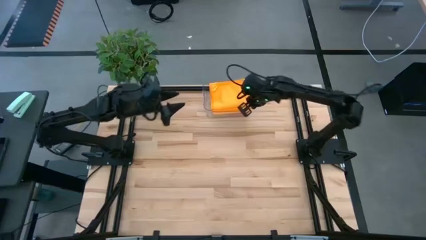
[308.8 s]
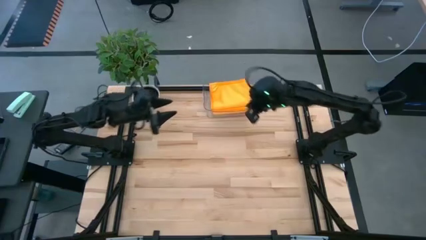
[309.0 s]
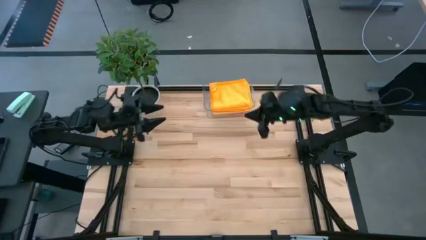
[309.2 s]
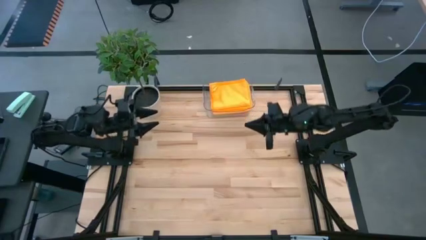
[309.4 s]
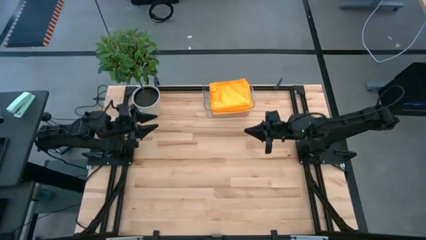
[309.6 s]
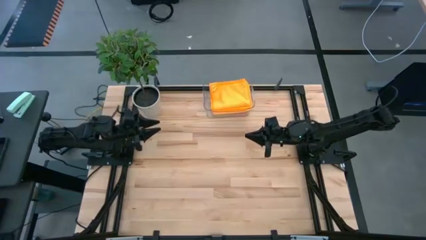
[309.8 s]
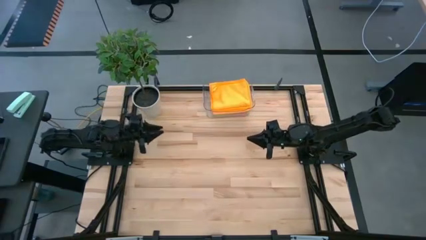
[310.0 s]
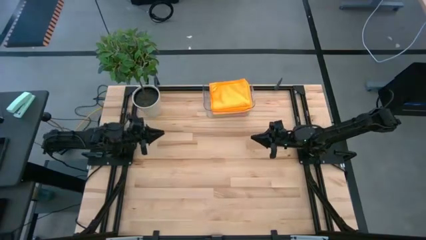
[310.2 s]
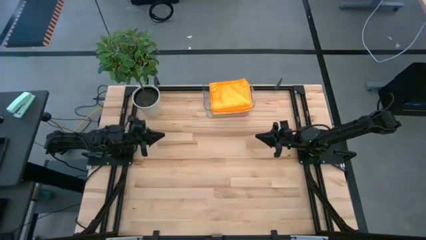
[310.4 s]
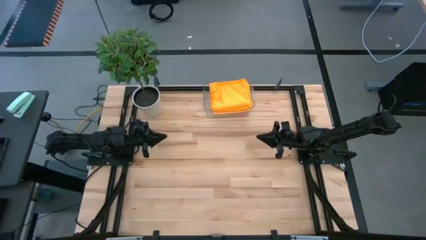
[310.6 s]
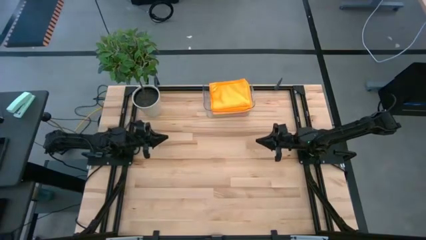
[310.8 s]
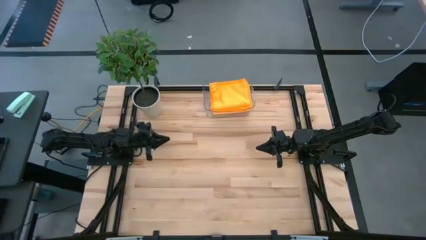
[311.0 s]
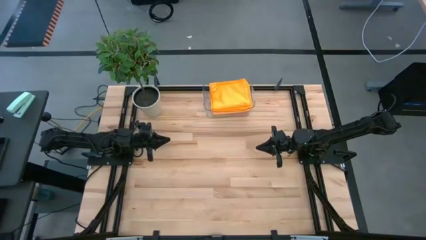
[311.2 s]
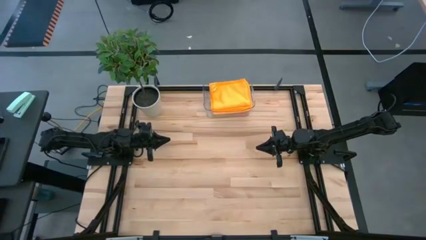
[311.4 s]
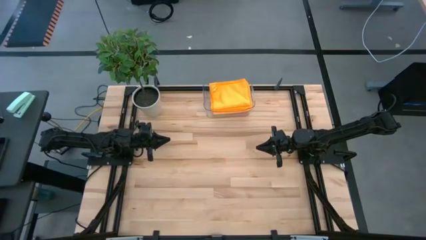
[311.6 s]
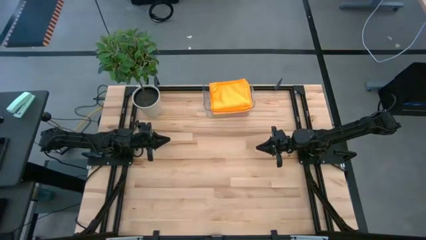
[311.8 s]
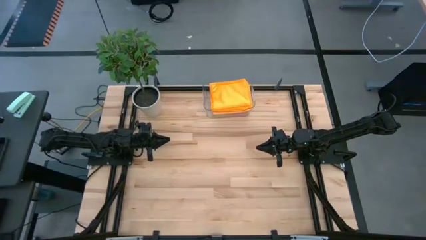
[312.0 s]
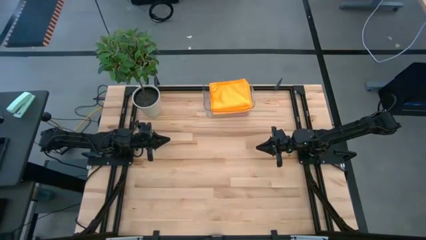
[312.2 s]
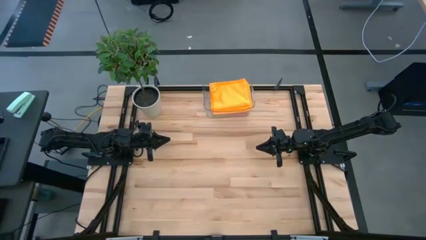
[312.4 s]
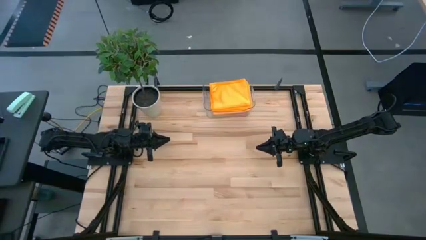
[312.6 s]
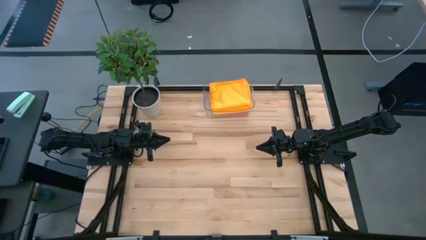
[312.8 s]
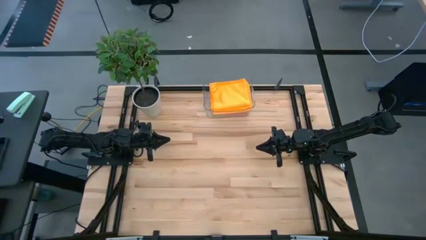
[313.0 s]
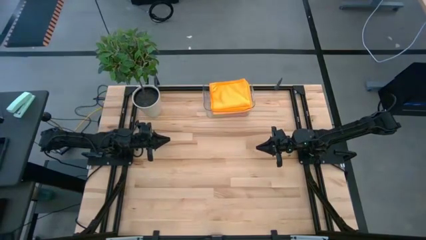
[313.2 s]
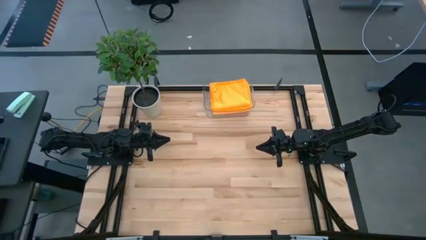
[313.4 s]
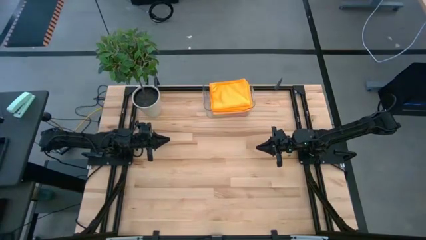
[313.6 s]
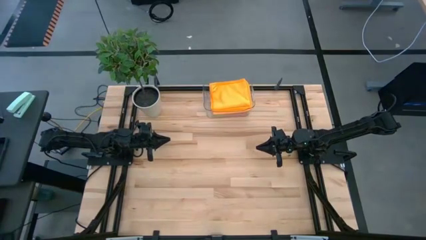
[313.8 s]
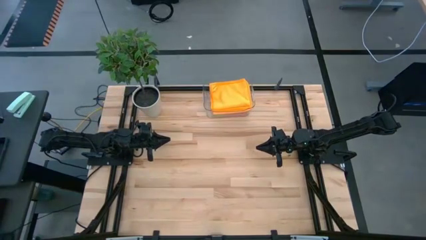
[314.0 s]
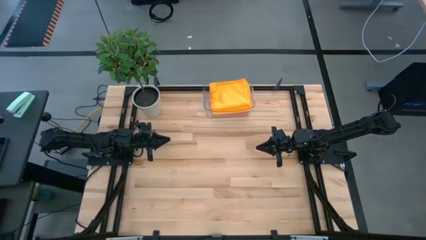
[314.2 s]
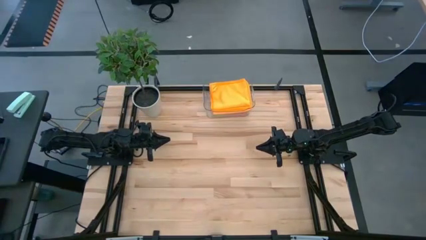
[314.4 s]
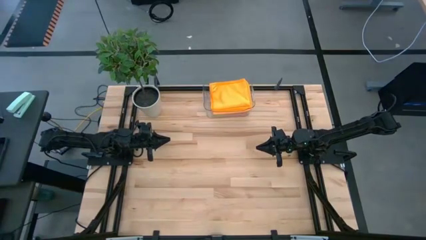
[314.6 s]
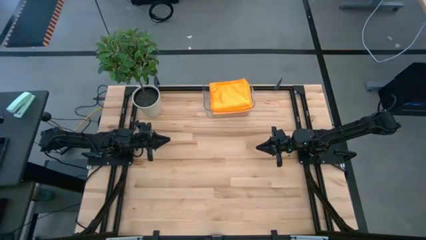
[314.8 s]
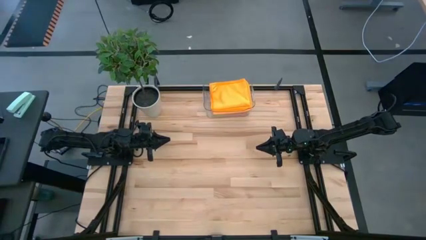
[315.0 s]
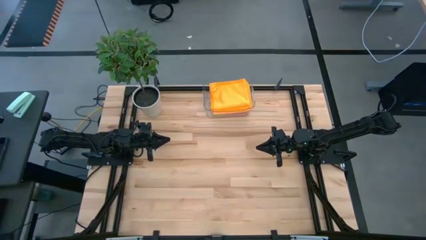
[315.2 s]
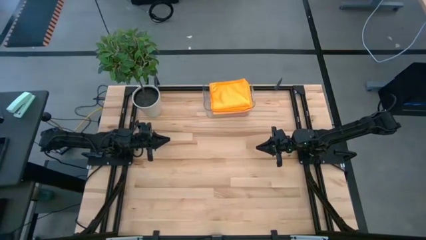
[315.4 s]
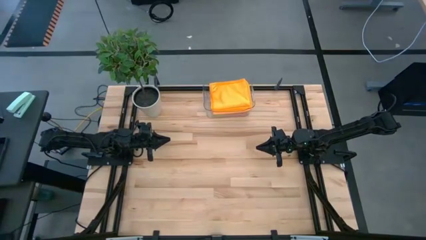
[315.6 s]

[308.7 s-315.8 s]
Task: Fold microfiber towels
Return to Home Position

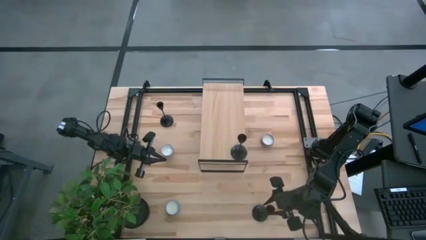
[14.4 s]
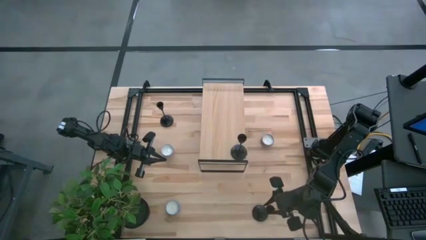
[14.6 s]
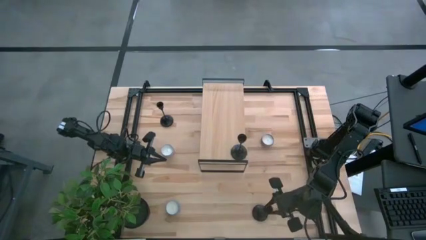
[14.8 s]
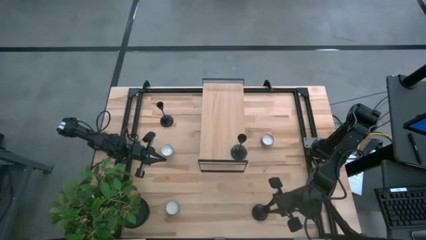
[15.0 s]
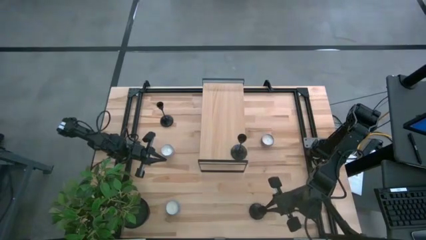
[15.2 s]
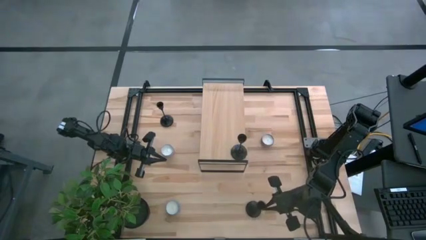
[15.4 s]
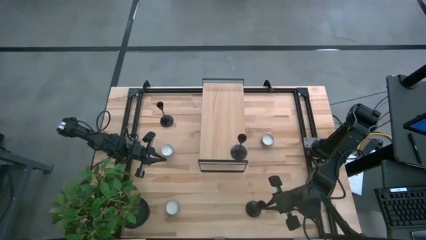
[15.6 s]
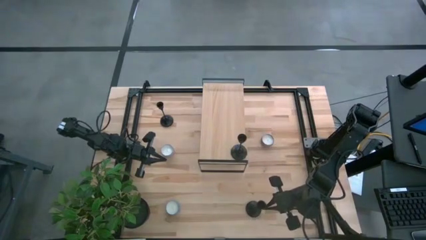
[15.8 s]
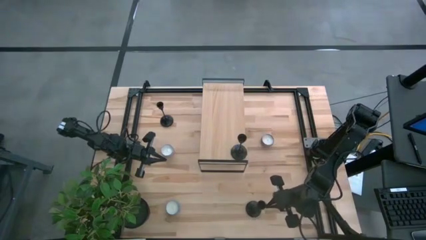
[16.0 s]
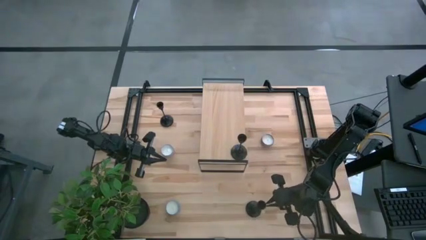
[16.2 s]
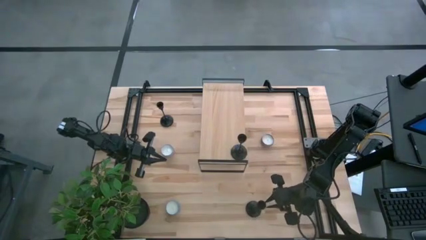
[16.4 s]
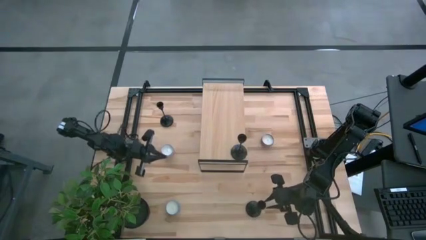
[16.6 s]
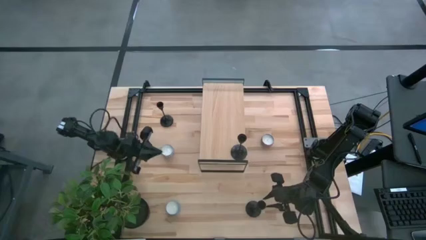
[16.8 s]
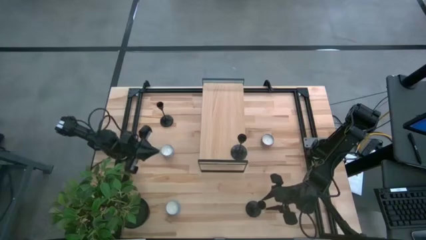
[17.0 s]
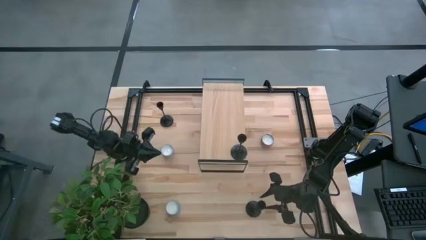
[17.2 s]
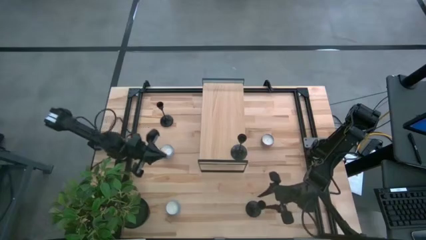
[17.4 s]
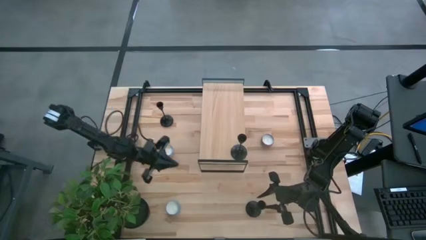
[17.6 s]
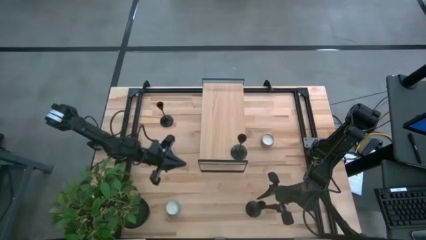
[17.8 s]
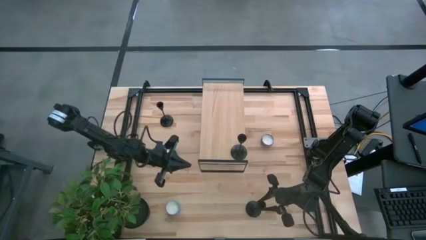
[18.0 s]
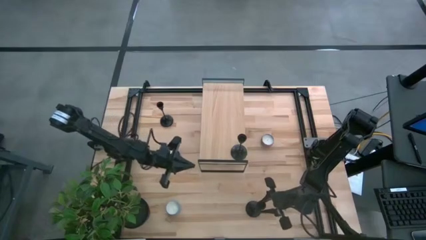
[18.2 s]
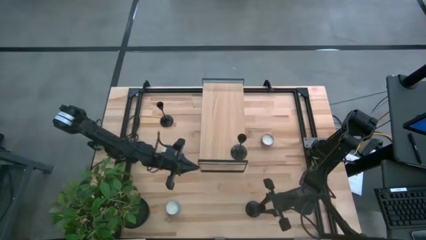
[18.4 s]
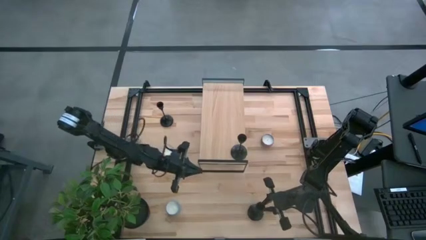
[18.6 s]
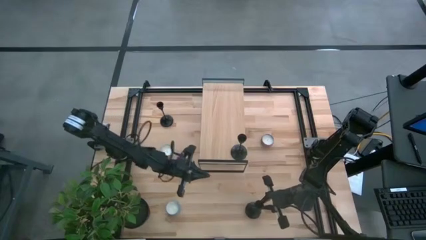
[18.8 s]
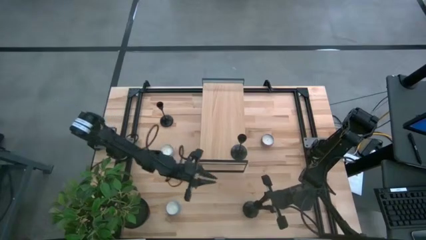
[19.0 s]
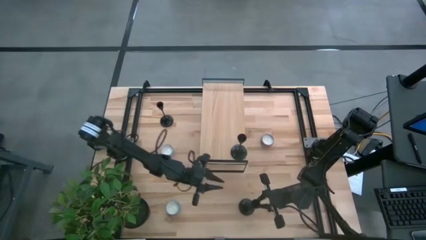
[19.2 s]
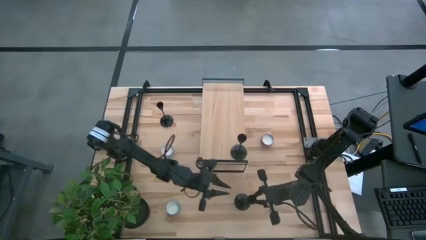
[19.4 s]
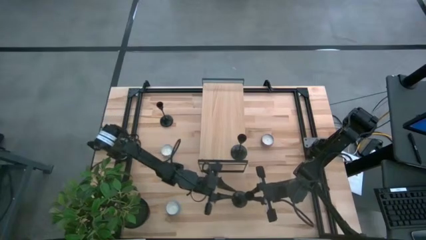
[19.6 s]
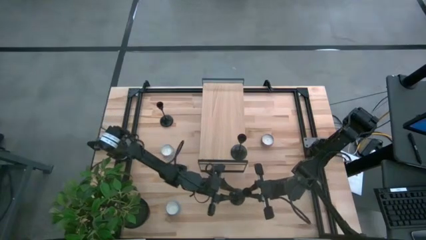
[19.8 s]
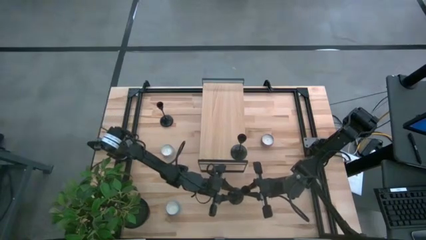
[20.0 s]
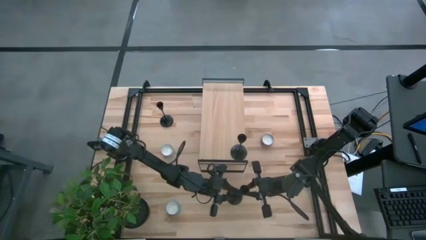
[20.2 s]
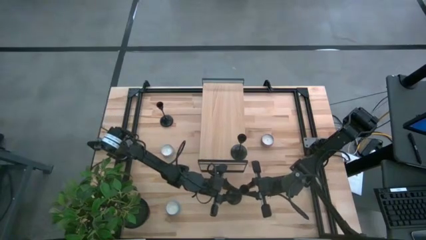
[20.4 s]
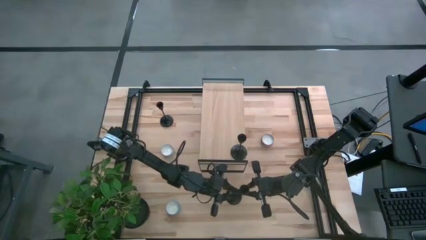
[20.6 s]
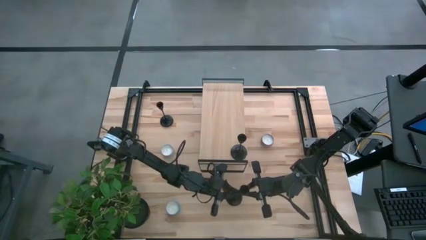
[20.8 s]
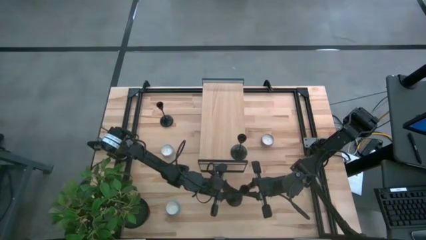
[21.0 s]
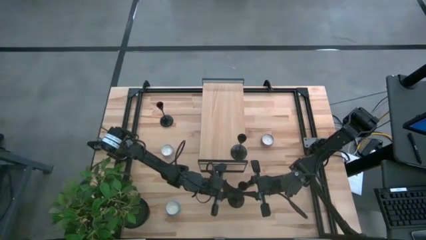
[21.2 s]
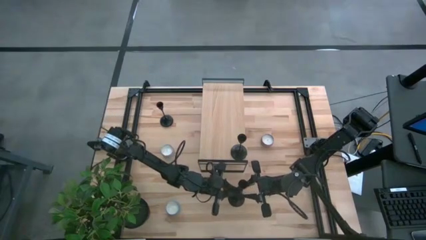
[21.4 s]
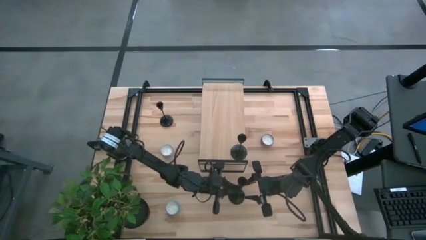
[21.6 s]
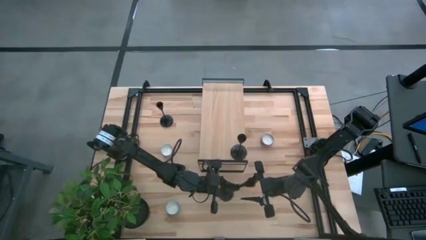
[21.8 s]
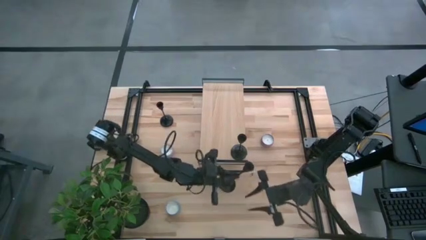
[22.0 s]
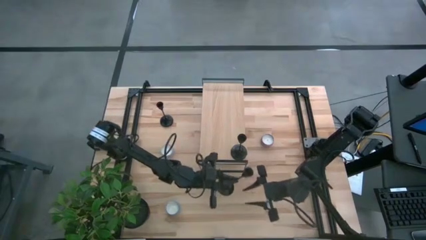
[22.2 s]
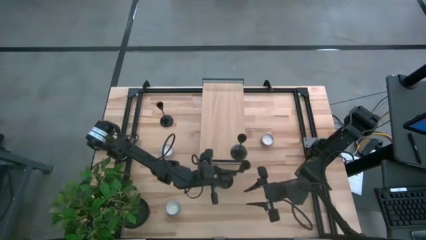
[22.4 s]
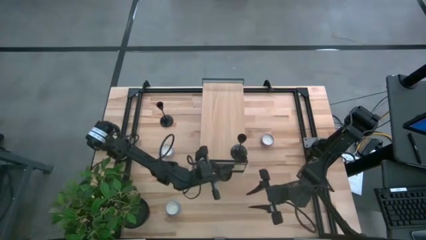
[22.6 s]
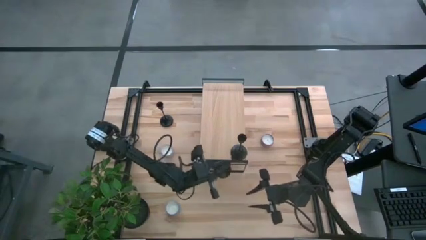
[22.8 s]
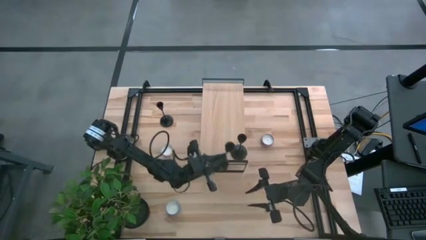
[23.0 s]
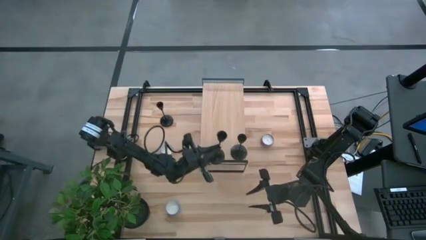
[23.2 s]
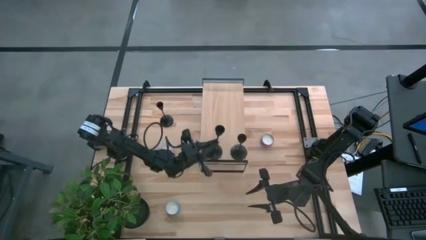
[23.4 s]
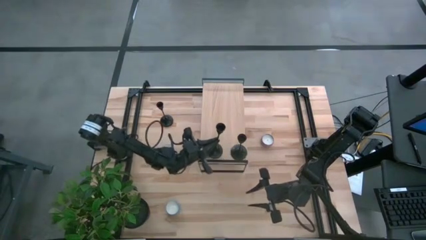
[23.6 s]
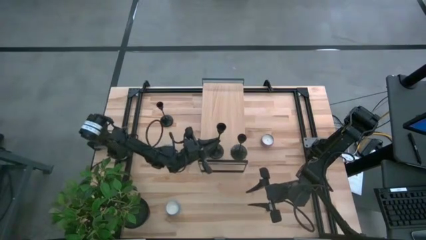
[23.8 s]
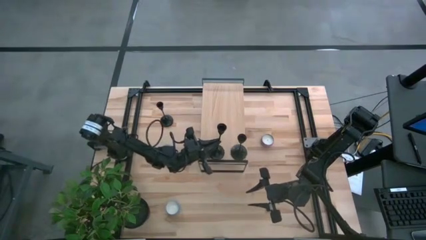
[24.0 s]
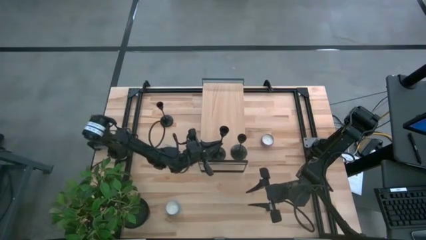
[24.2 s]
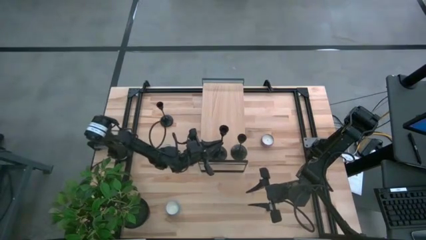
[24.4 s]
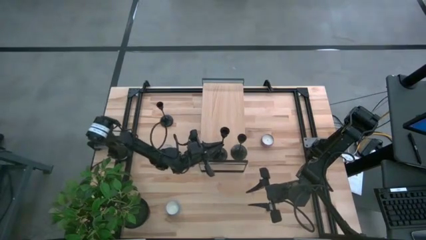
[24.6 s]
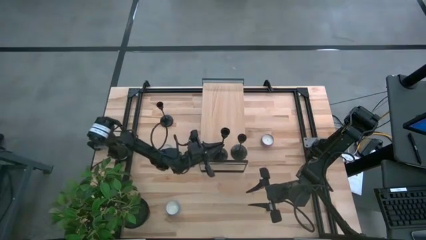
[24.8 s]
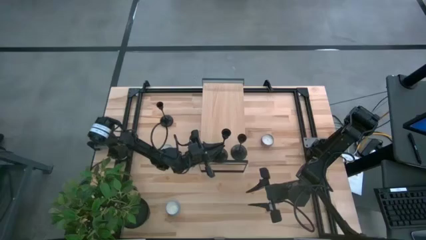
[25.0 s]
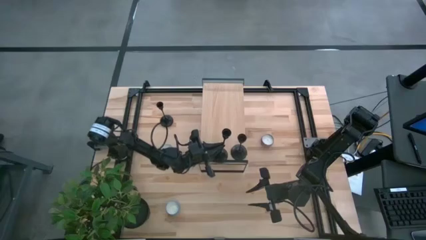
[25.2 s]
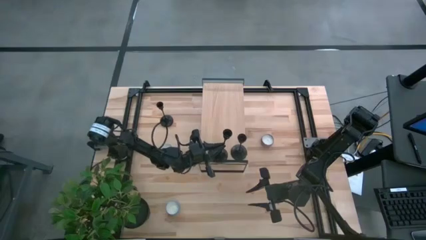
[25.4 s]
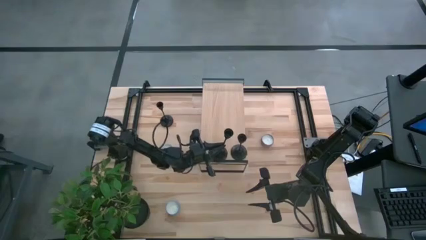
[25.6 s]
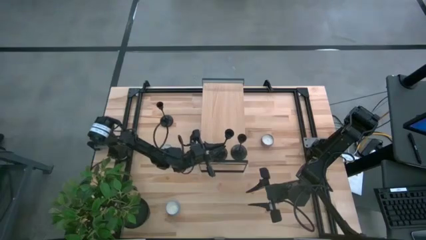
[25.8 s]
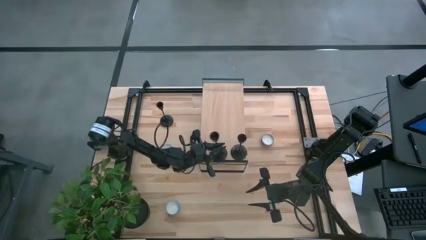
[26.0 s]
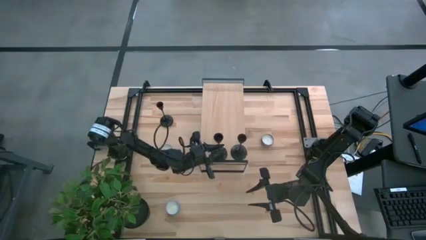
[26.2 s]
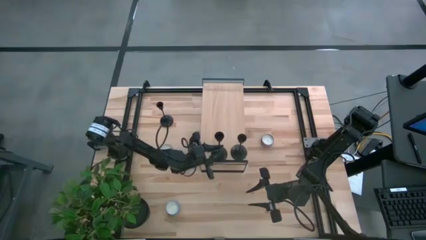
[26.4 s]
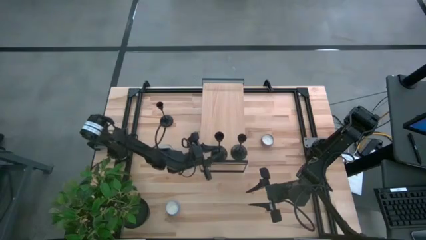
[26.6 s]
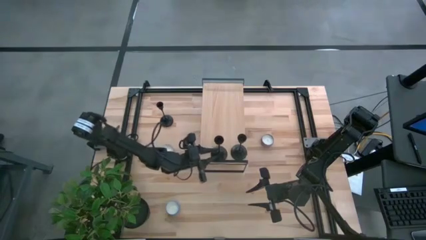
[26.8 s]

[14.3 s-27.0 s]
Task: Pick & Place candle stick holders
Put the bottom black candle holder on the shelf aligned with the other black candle holder
